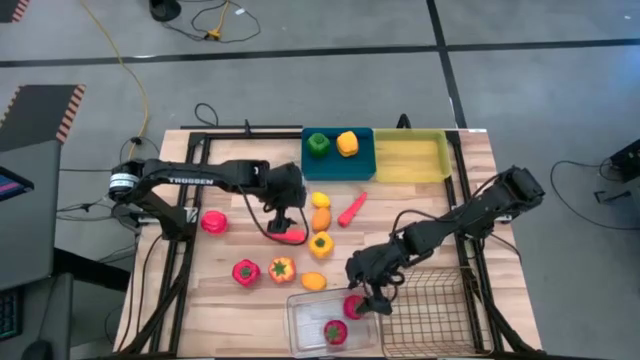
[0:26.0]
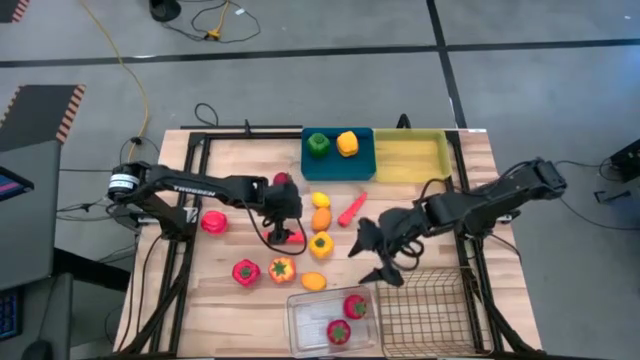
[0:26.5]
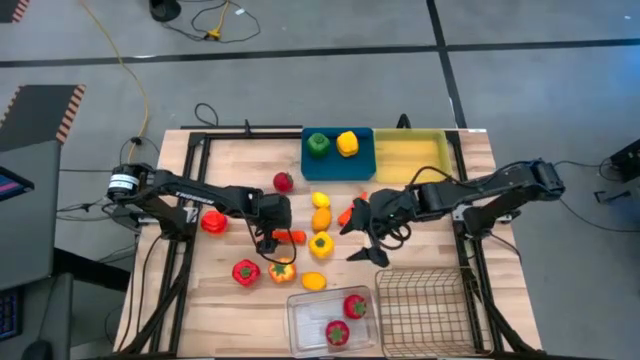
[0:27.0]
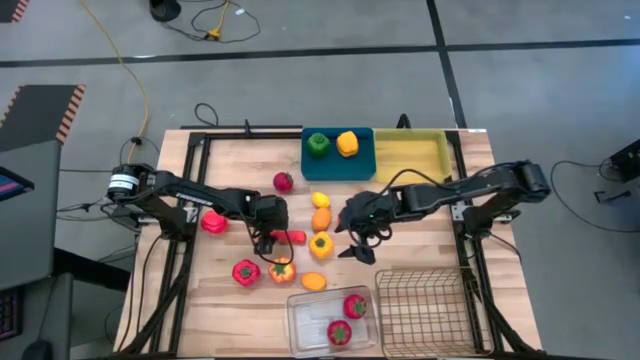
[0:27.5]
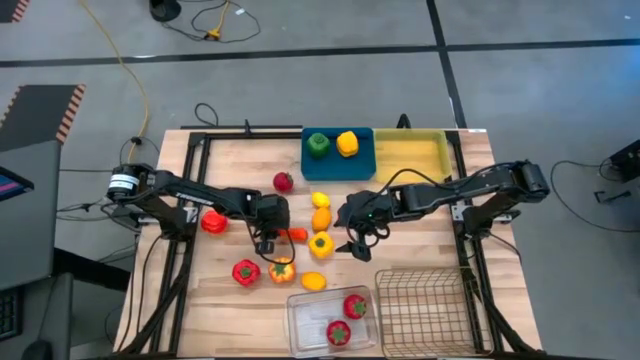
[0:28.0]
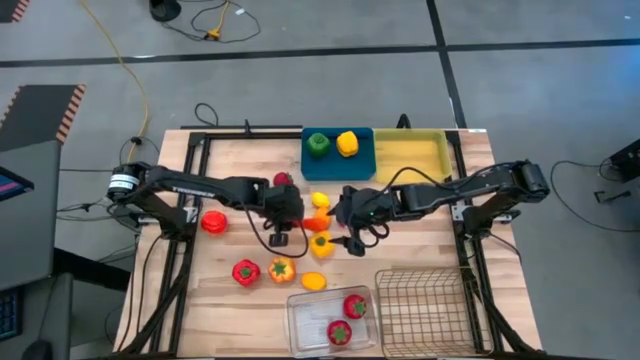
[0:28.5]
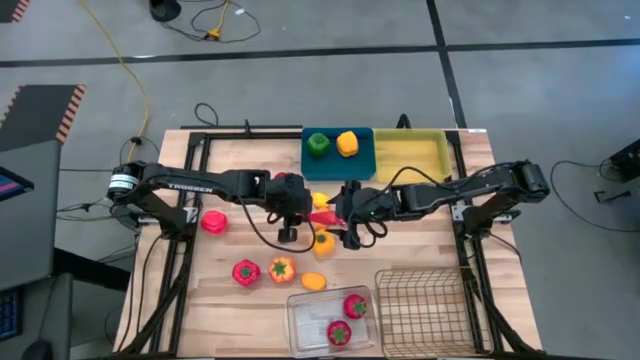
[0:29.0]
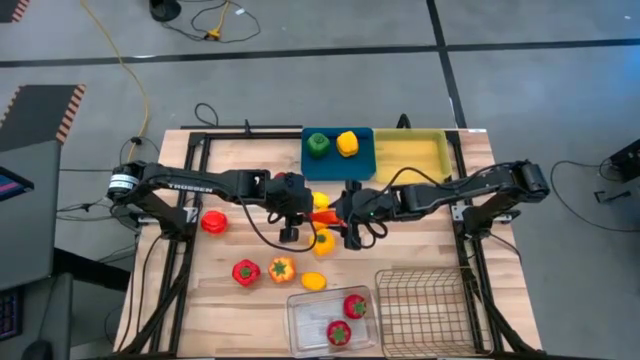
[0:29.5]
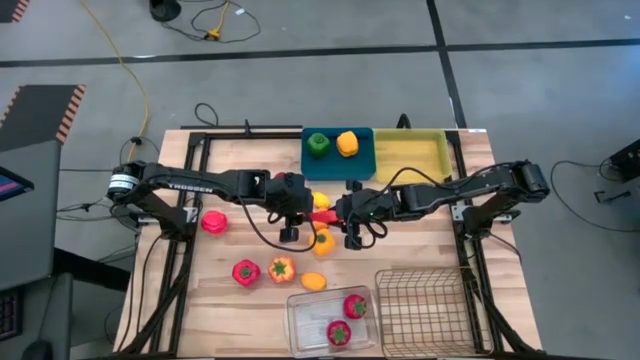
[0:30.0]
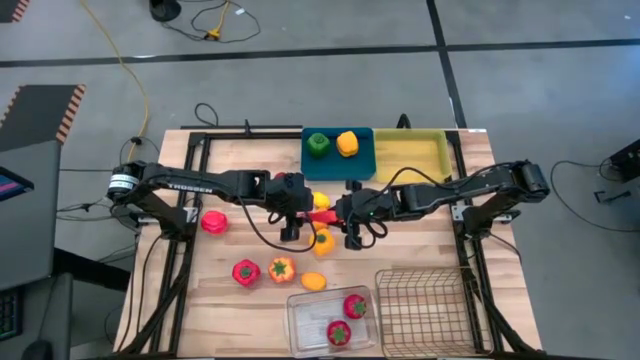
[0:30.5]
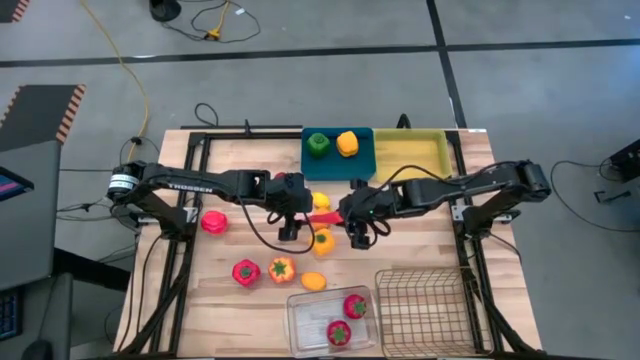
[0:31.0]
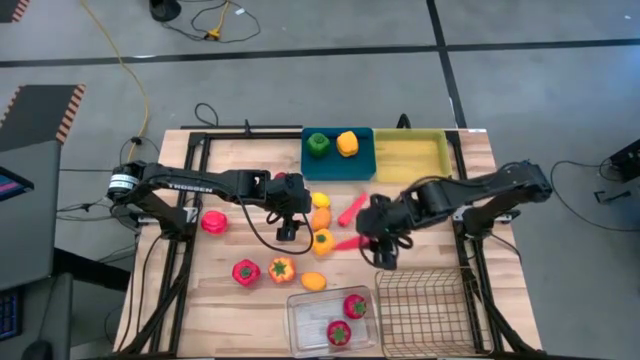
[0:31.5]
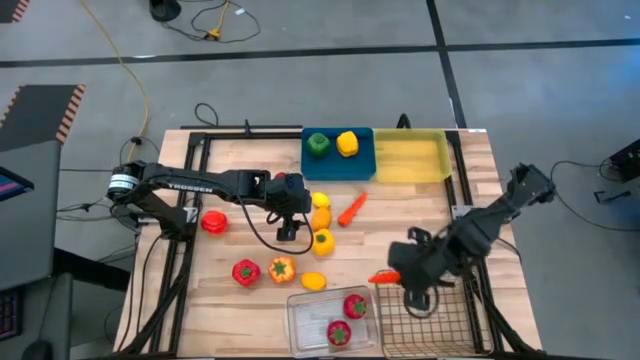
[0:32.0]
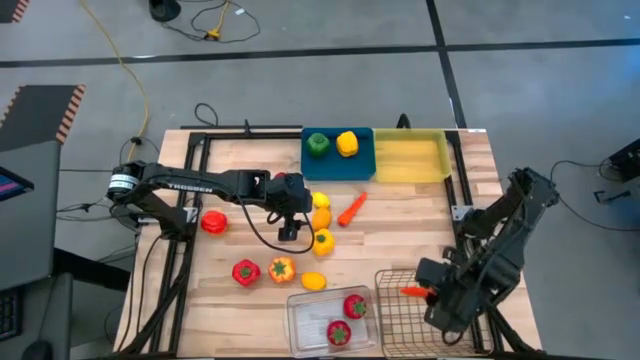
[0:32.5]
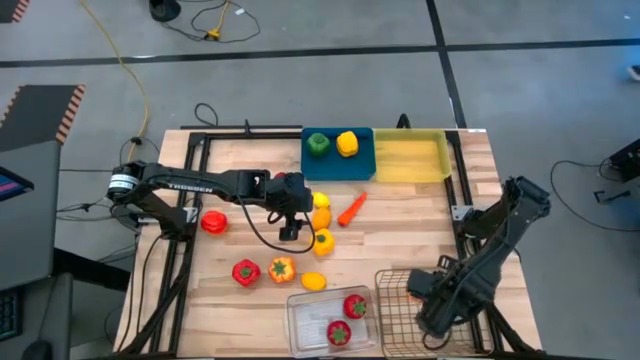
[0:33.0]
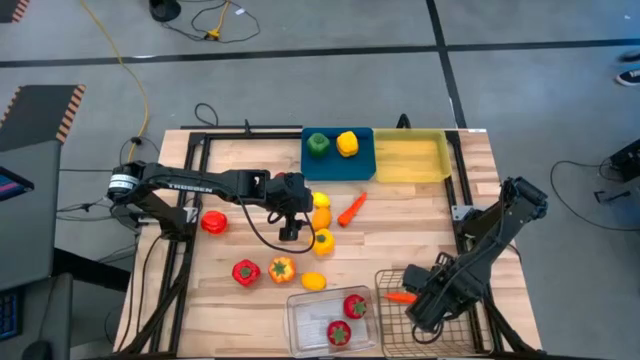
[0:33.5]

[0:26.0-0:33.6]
Task: Sort produce into baskets
Put the carrot into the wire basket

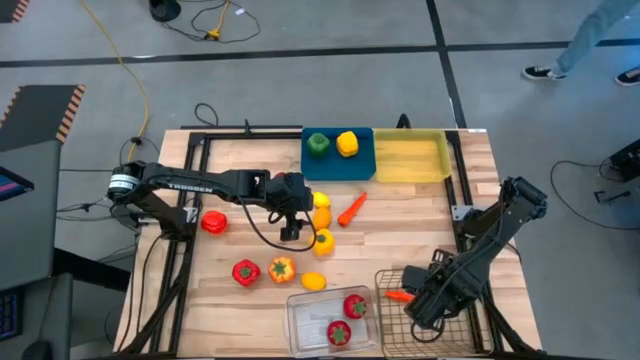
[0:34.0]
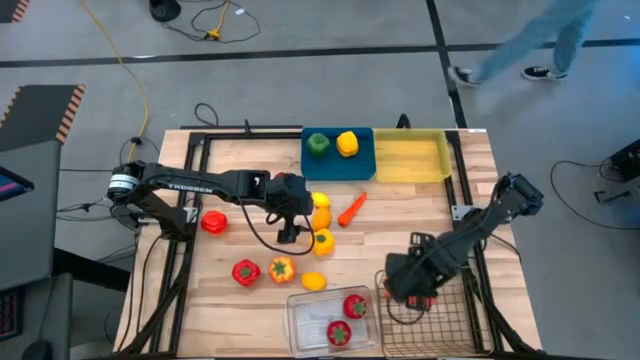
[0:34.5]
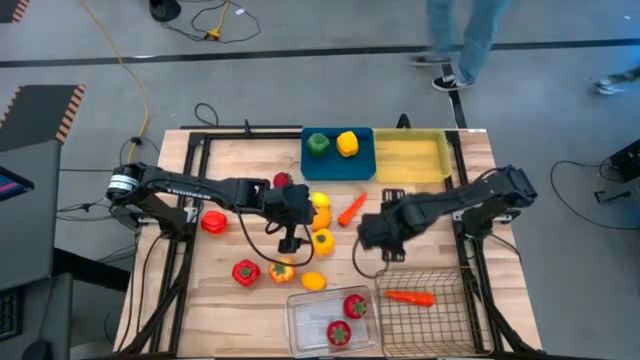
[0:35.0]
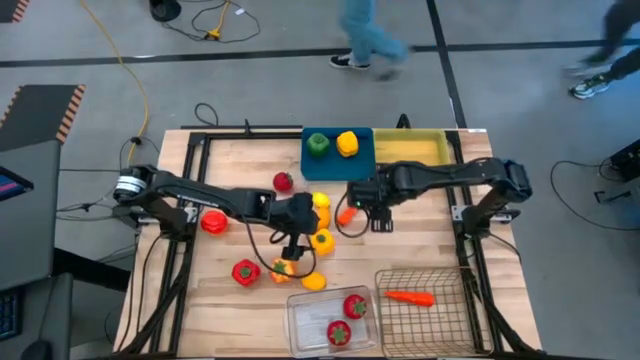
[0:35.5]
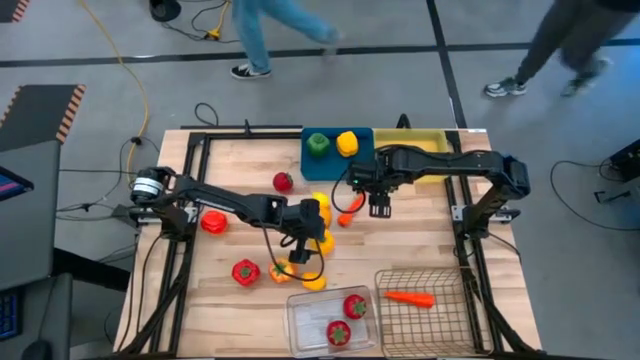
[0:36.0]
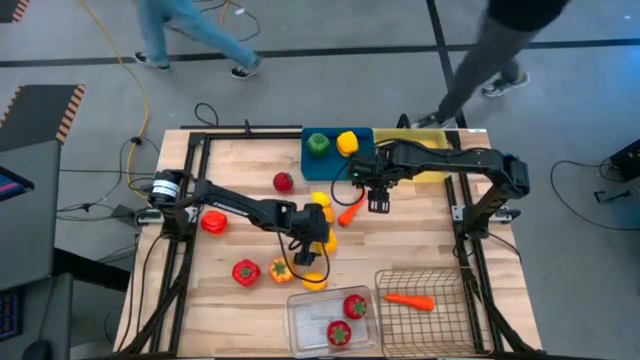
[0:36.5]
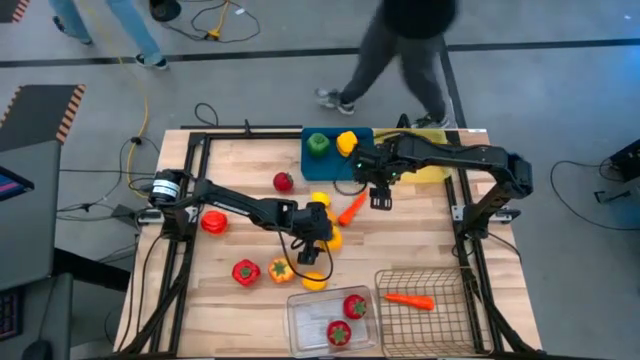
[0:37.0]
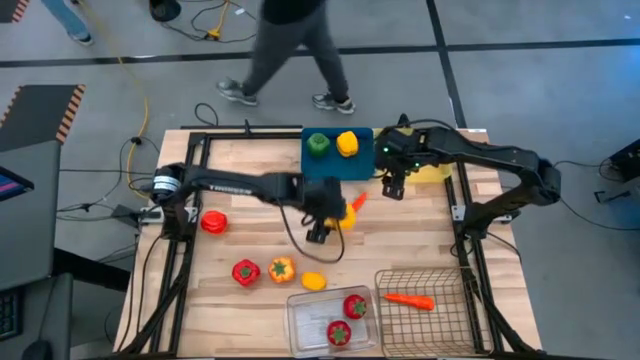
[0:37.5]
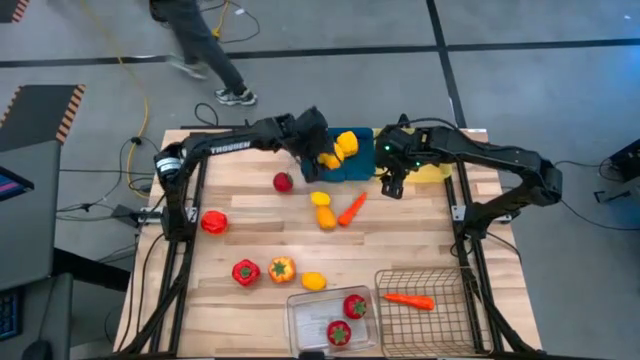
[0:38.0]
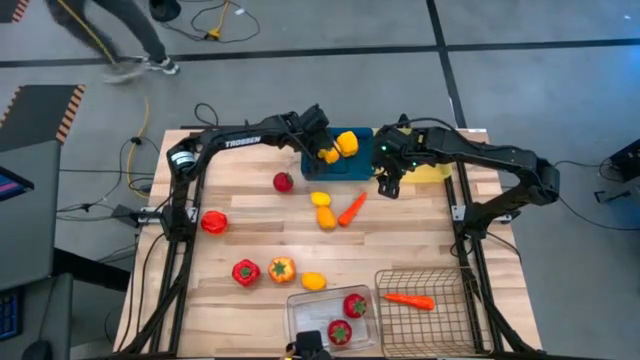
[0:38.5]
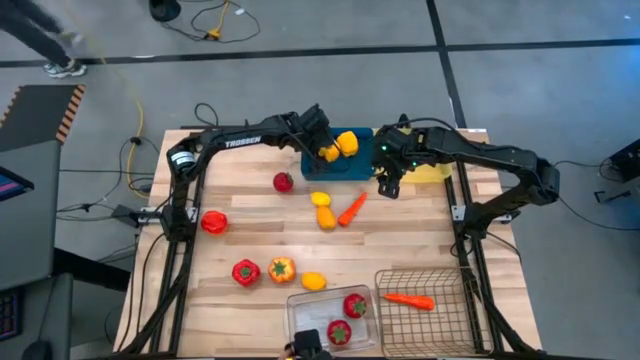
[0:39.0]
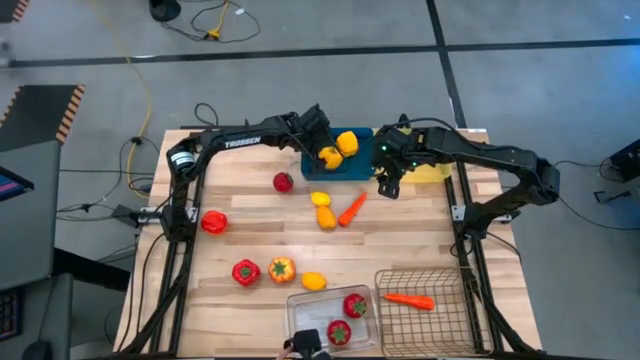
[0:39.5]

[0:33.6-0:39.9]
Put the yellow bell pepper into the blue bin

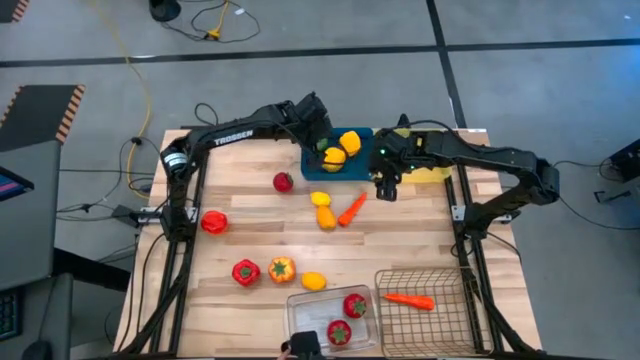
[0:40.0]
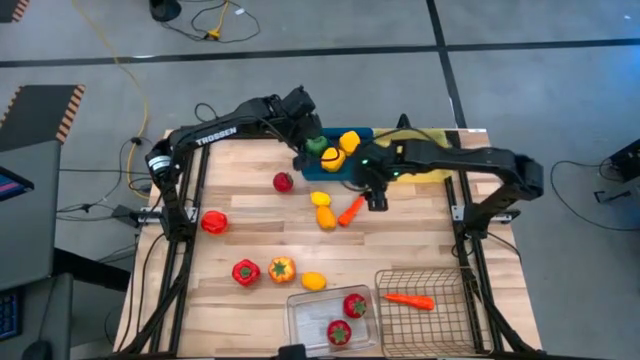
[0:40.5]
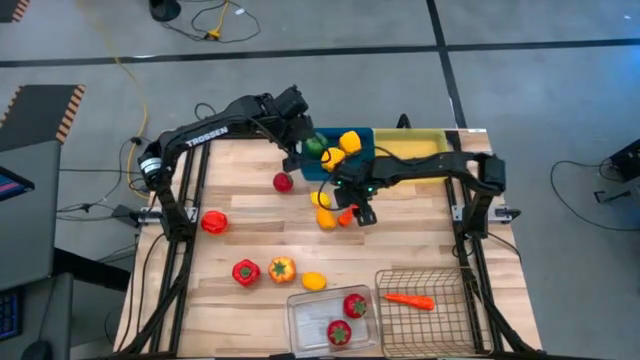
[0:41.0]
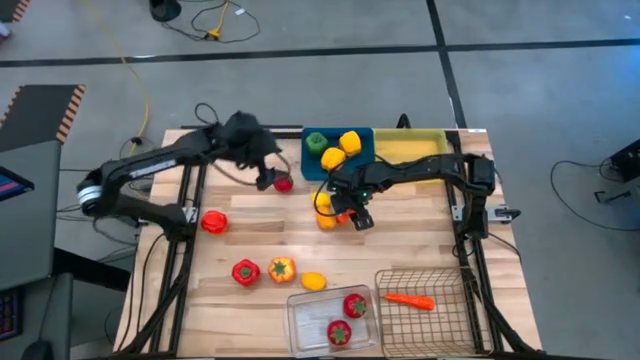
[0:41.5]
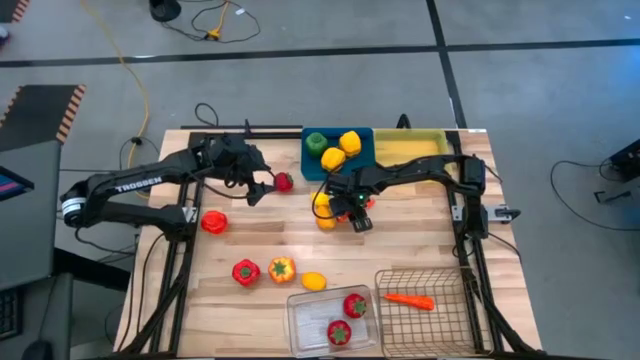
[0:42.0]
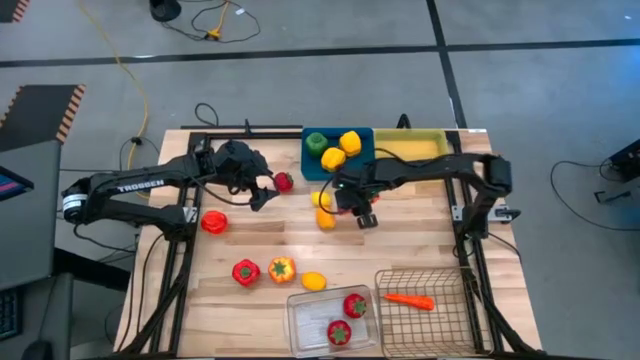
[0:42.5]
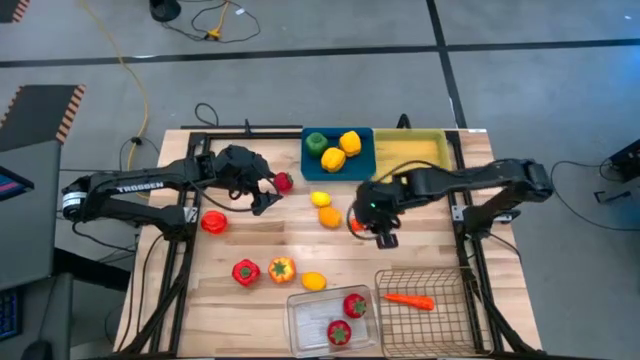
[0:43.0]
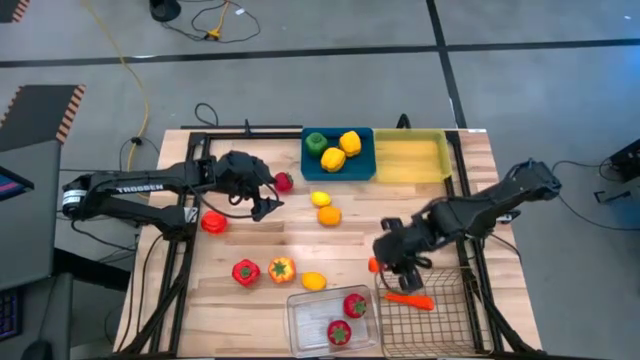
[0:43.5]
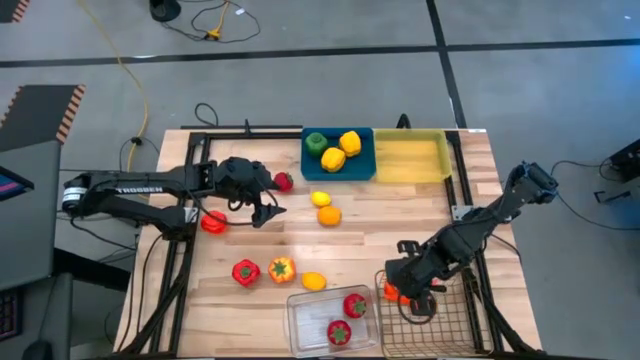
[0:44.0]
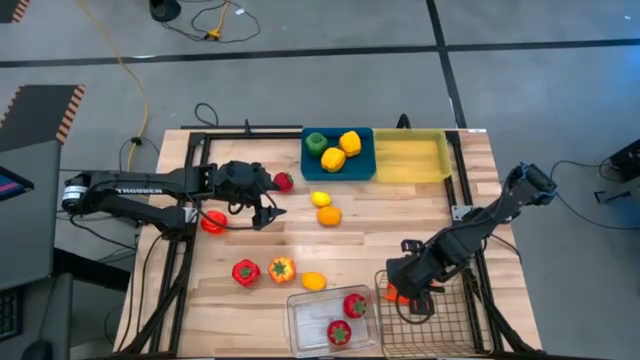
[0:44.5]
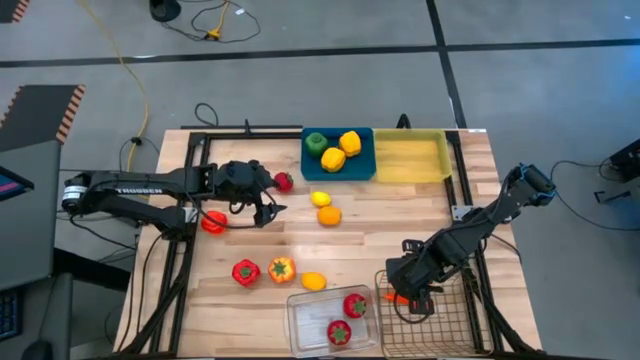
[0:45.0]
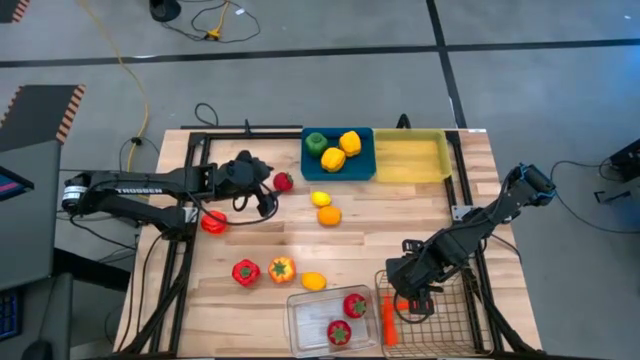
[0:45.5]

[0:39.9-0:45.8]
Put the carrot into the wire basket

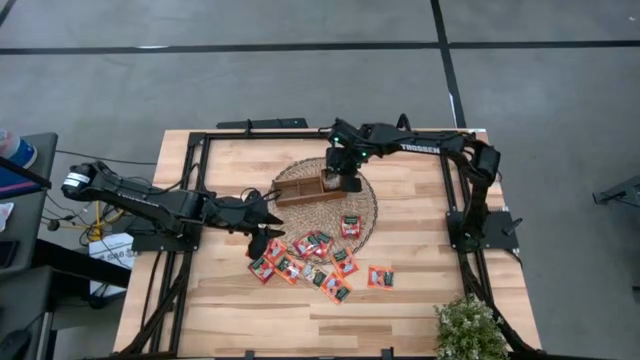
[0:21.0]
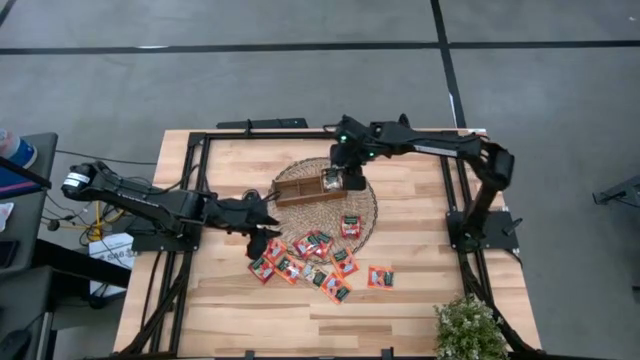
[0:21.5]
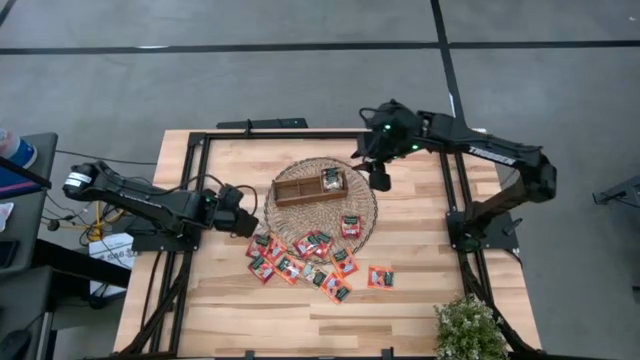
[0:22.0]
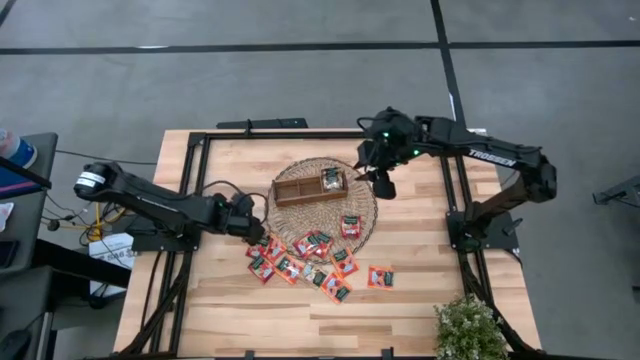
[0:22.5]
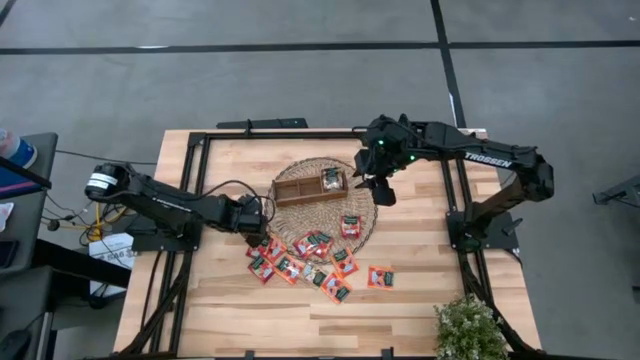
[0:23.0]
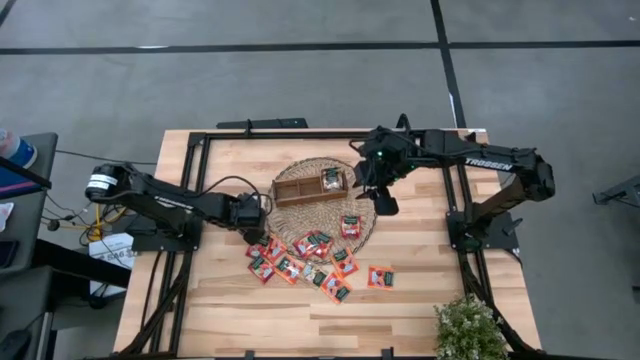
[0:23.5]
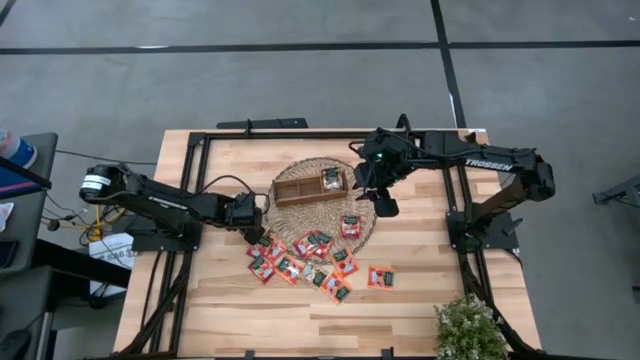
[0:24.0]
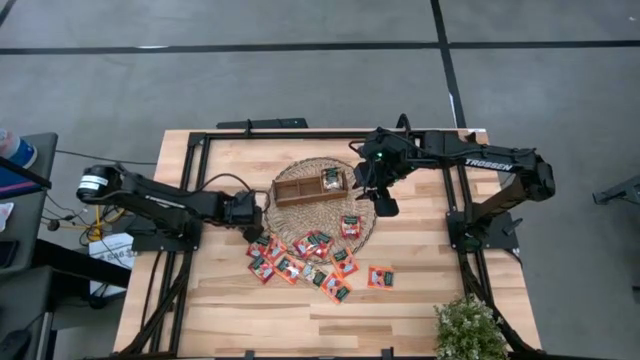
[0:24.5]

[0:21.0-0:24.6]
Task: Pick & Place Tea
Put the left brown tea bag into the right section of the wooden organizer
